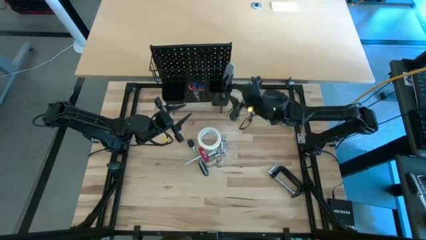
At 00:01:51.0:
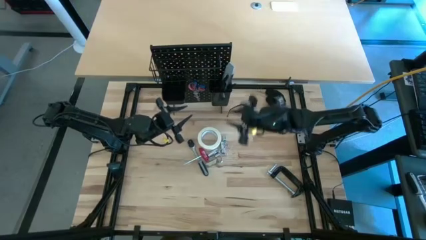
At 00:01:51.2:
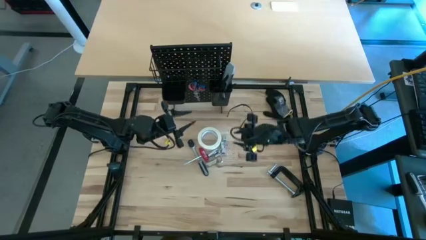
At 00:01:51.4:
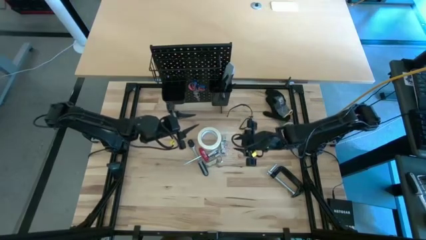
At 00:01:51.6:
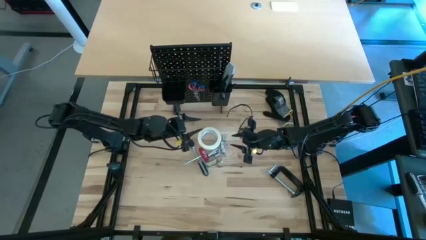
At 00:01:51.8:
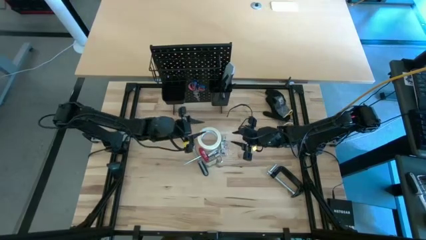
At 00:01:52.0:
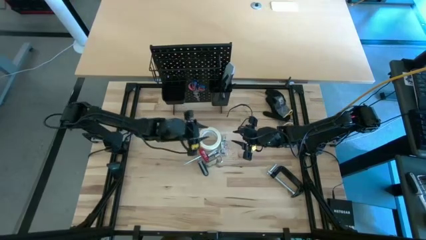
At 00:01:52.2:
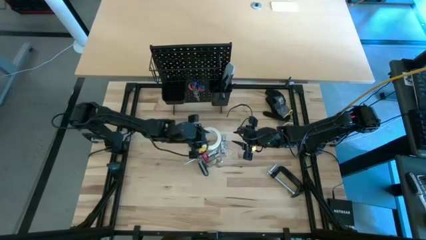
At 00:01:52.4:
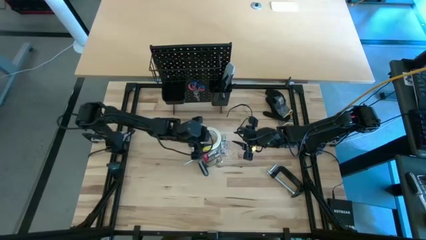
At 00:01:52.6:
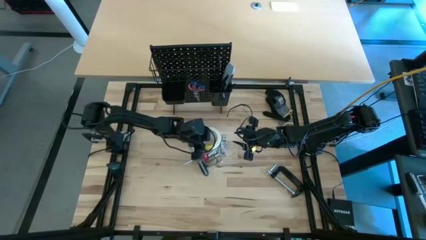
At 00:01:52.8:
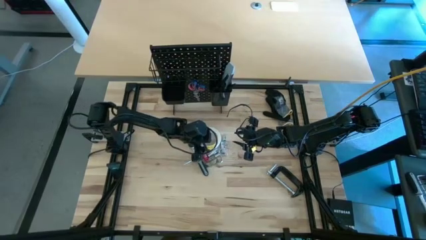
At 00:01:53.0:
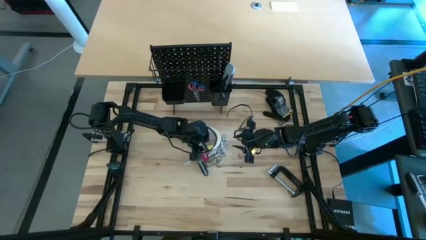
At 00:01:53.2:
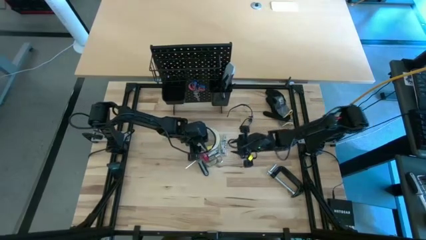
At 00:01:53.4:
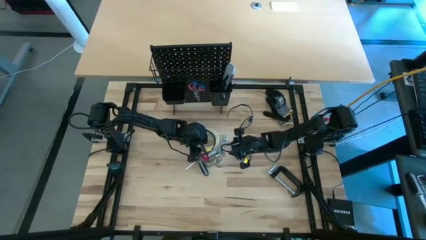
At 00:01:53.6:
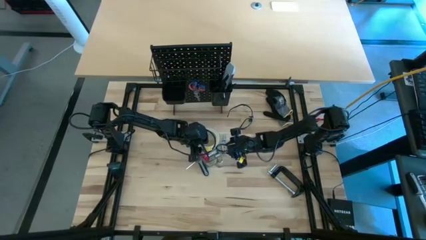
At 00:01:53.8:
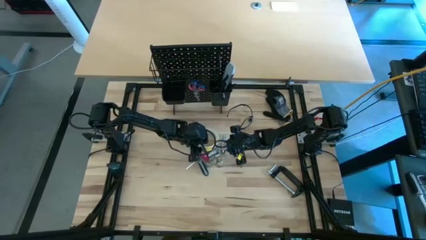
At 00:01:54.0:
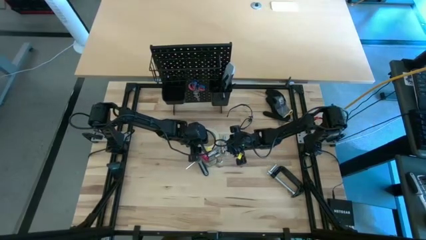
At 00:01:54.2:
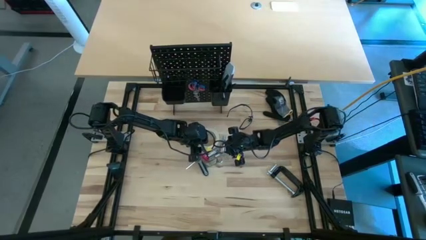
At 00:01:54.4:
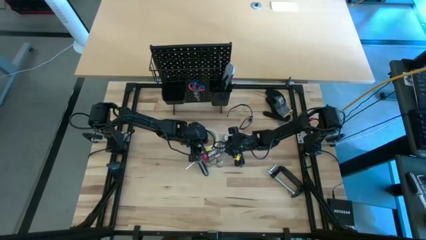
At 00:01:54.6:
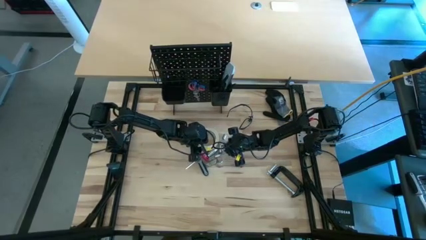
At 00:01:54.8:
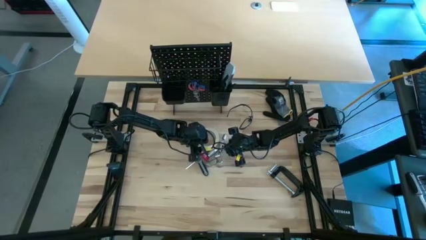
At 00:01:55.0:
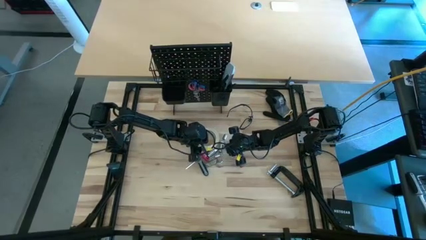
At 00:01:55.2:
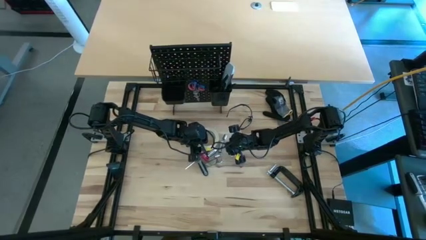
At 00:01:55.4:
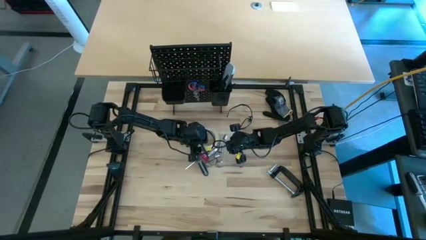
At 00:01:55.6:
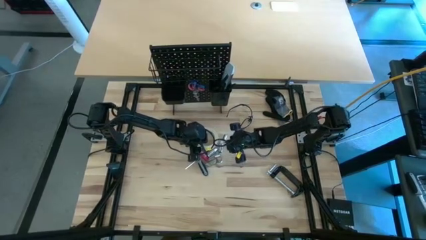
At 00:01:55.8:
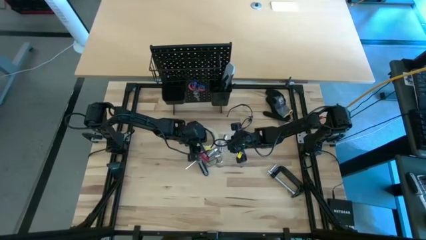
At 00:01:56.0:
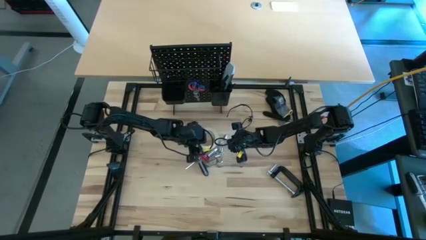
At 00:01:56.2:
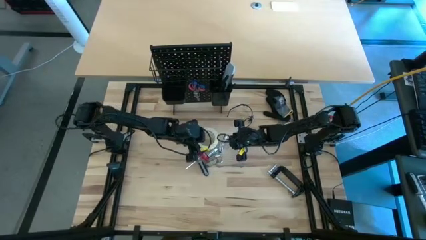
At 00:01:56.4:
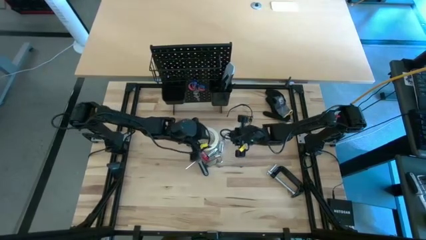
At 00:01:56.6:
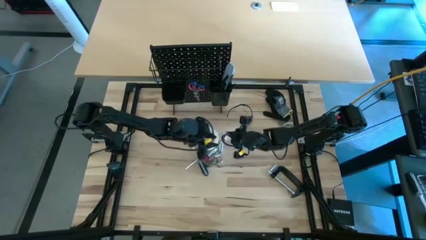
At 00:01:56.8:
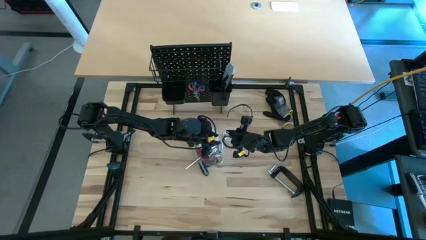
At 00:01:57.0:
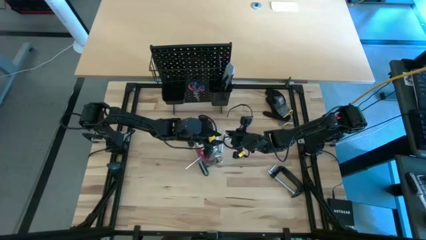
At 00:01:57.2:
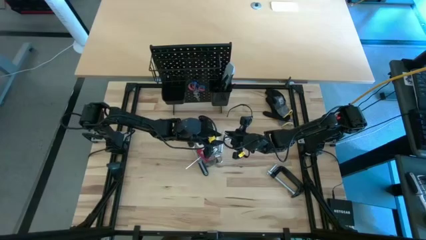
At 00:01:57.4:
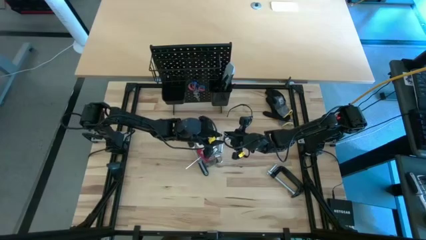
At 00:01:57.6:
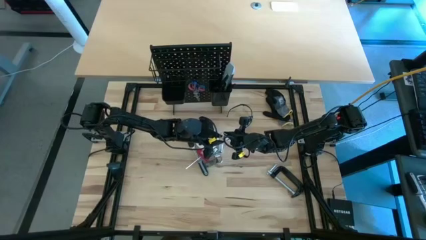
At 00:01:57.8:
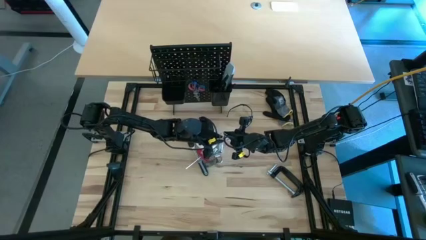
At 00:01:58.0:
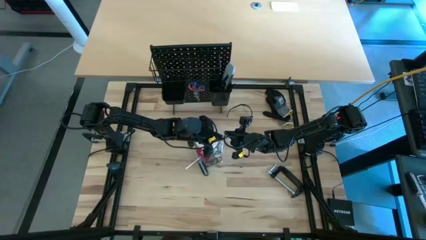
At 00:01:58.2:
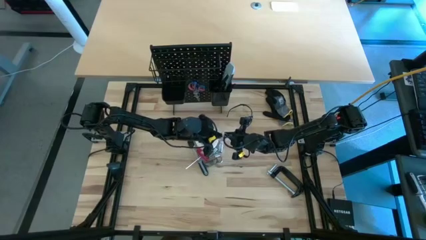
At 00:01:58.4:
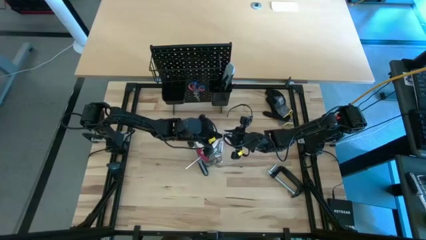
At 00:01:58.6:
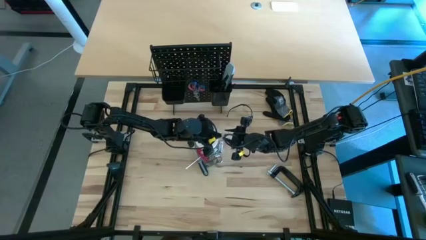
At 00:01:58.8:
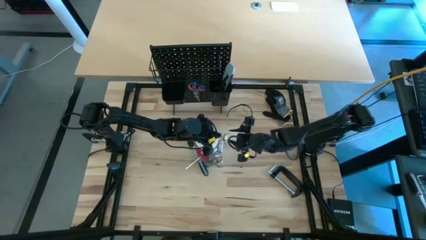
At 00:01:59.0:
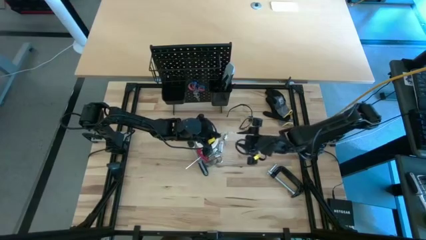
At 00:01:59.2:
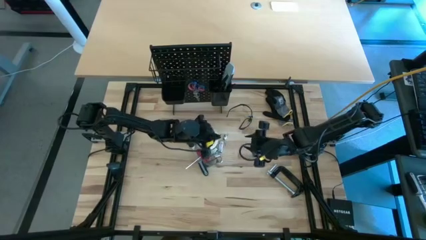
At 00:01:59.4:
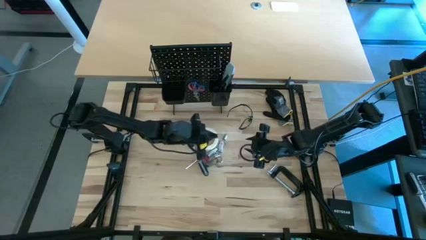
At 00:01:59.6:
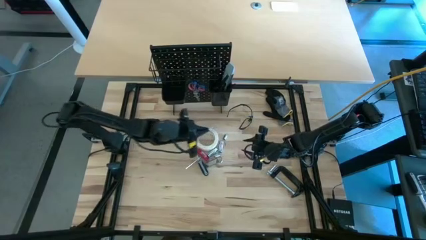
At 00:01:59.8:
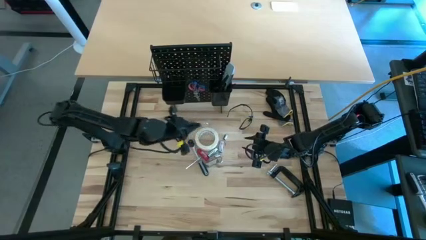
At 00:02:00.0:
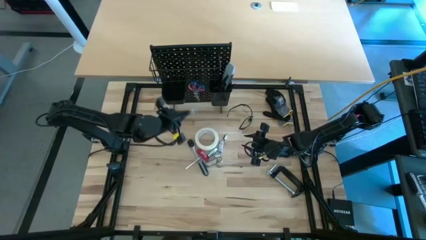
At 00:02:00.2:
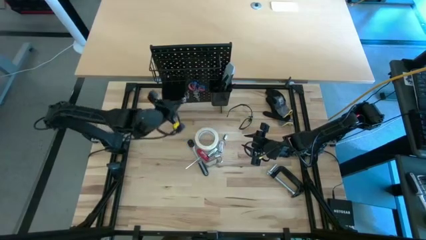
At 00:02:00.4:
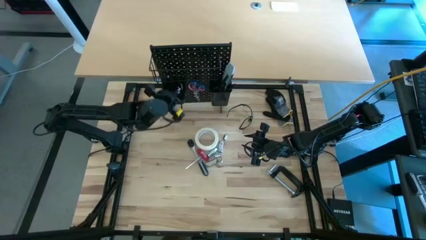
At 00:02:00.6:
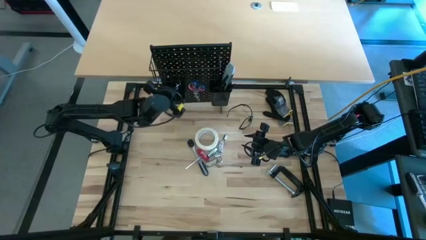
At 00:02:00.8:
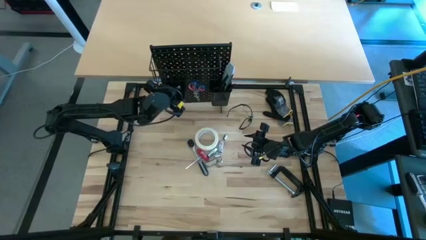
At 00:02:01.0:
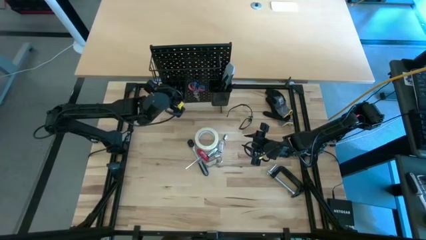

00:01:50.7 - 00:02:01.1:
Task: Hang tools onto peg board
Put the silver binder clip into the left black bin on the peg board

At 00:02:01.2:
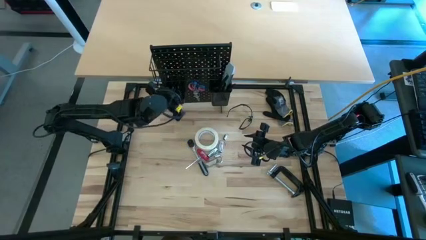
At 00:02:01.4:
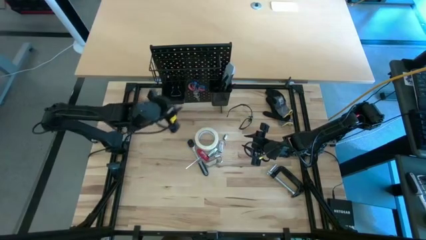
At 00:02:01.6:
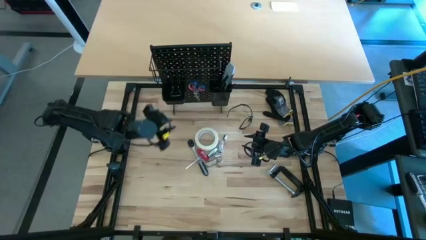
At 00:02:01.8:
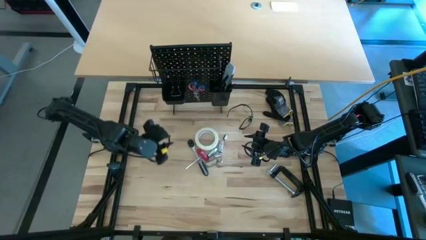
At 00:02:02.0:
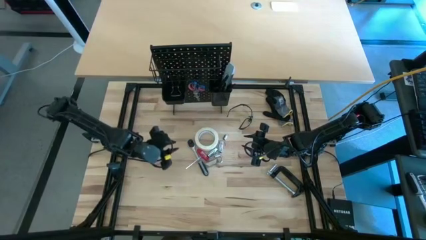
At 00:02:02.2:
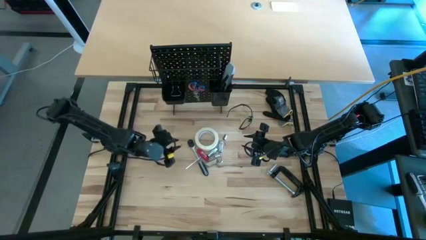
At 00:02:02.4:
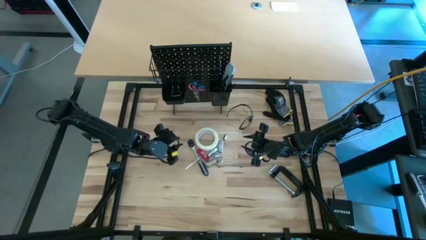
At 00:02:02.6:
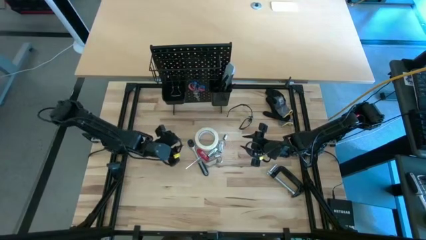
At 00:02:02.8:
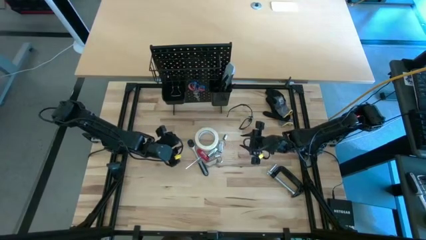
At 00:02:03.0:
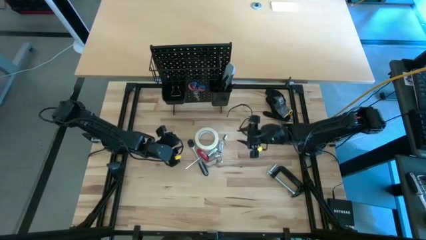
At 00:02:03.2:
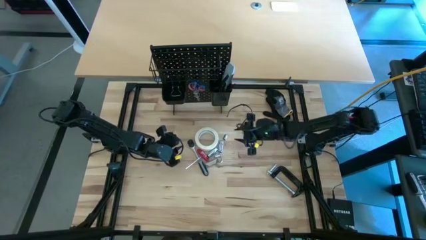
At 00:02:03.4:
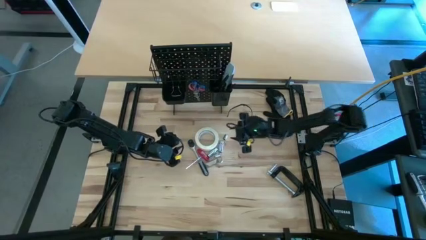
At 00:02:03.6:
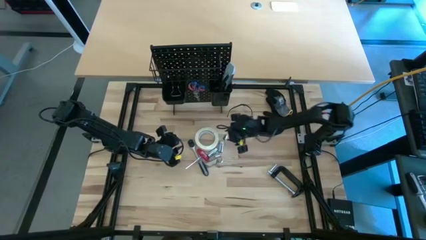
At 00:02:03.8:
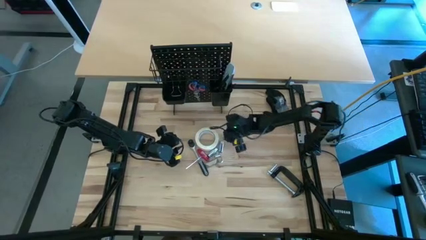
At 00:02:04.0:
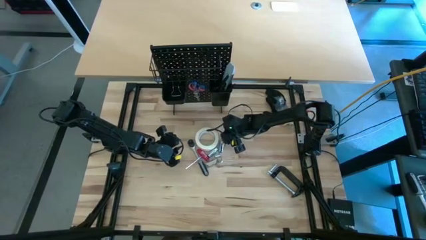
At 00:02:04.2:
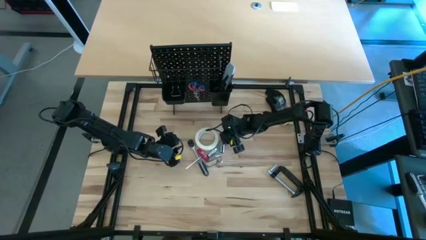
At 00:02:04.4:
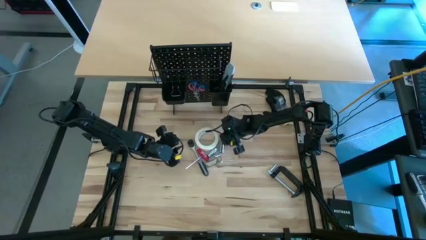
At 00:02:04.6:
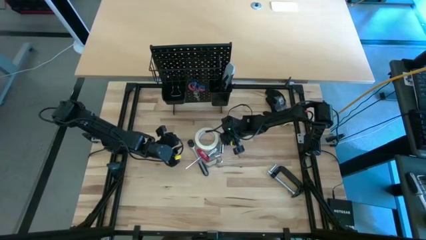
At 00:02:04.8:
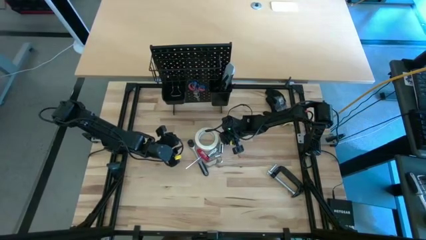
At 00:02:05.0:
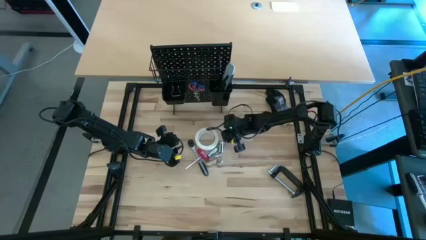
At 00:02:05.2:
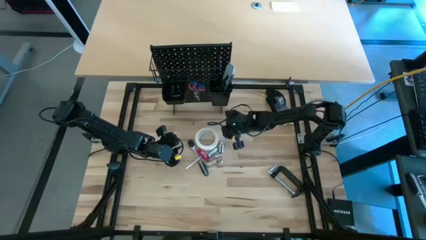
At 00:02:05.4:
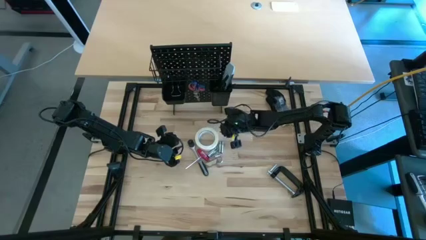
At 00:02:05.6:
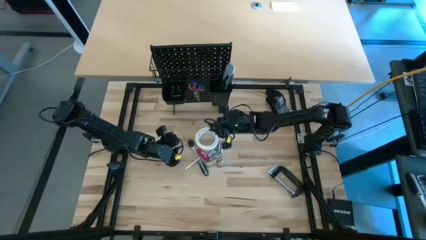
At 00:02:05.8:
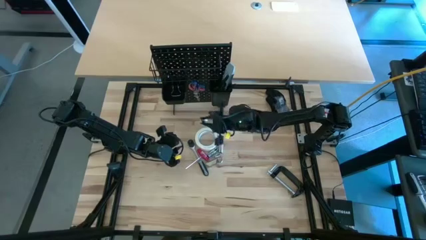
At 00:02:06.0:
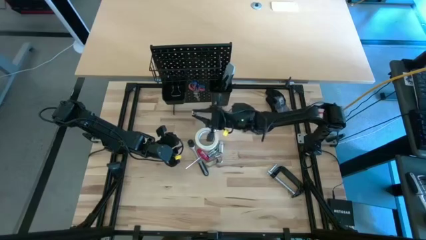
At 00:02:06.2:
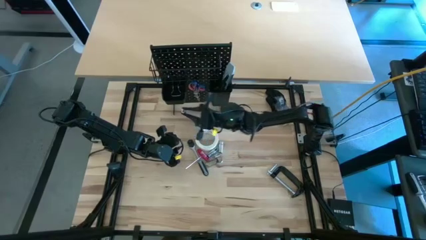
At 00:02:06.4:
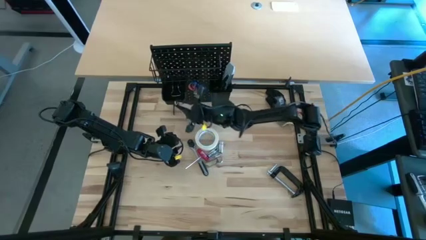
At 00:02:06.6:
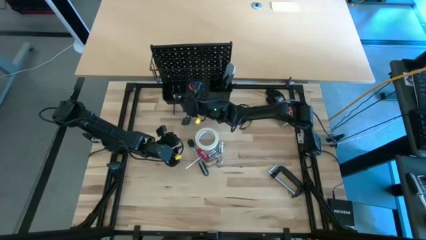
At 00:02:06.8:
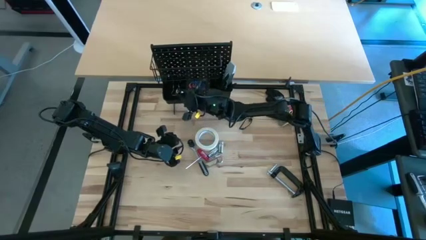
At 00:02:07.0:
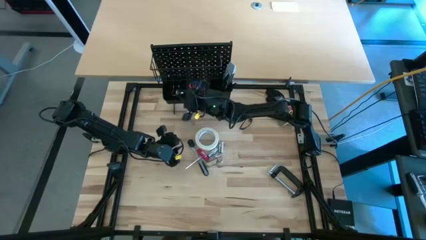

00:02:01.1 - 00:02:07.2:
Put the silver socket into the left black bin on the peg board
